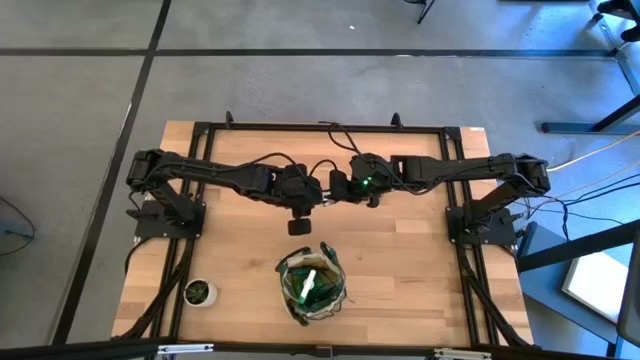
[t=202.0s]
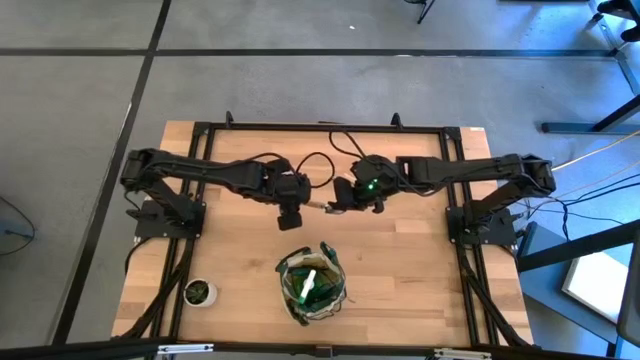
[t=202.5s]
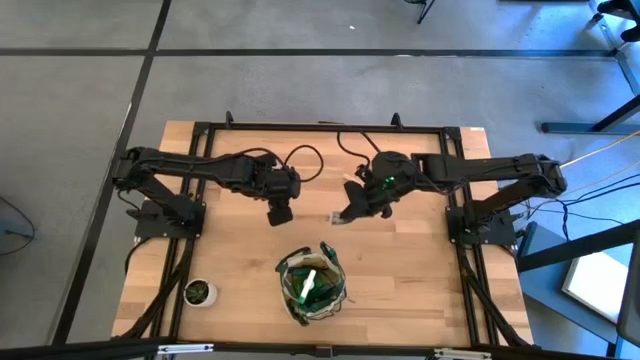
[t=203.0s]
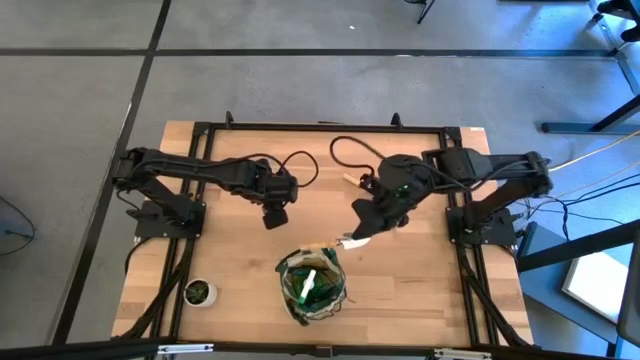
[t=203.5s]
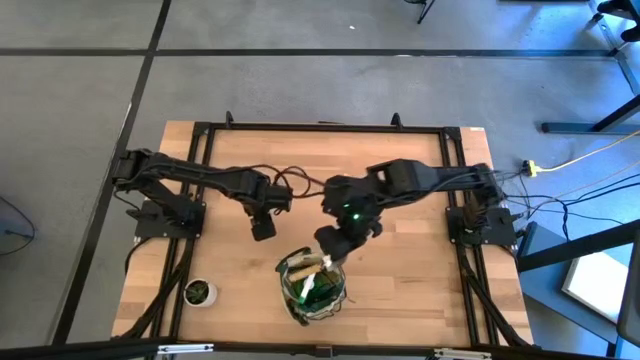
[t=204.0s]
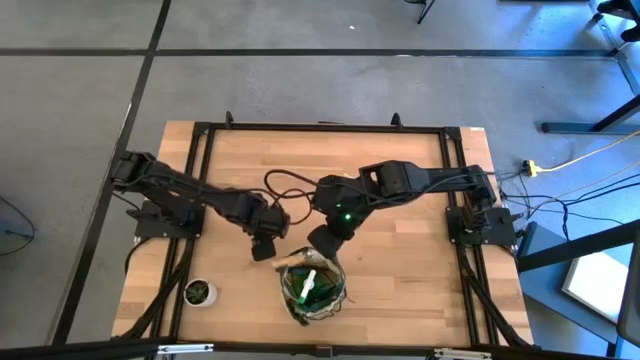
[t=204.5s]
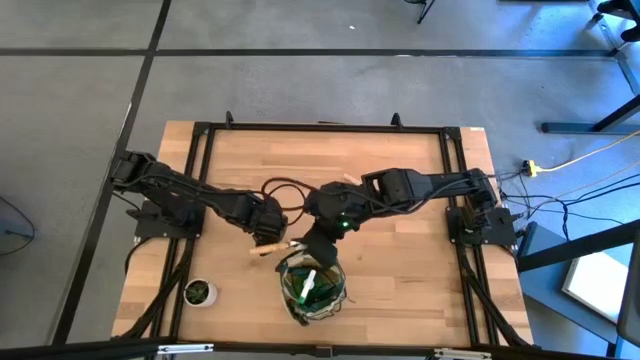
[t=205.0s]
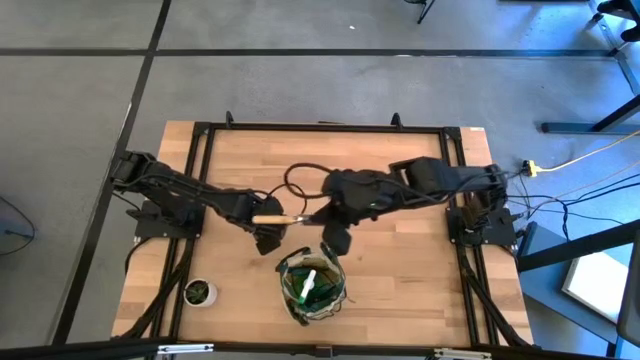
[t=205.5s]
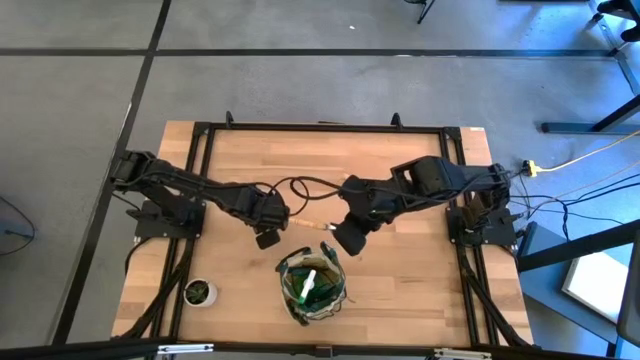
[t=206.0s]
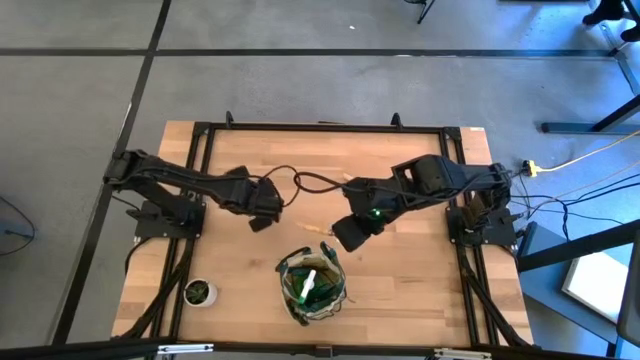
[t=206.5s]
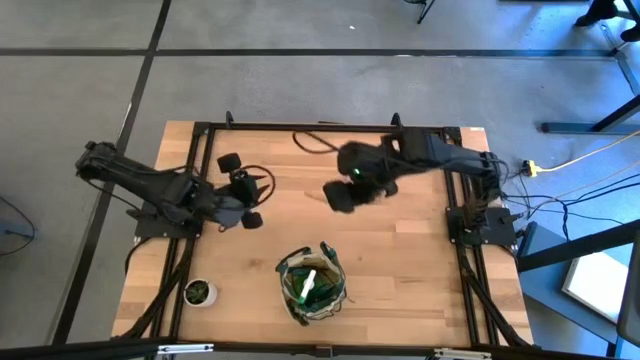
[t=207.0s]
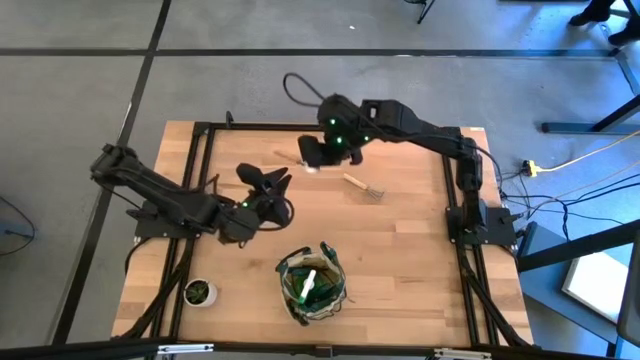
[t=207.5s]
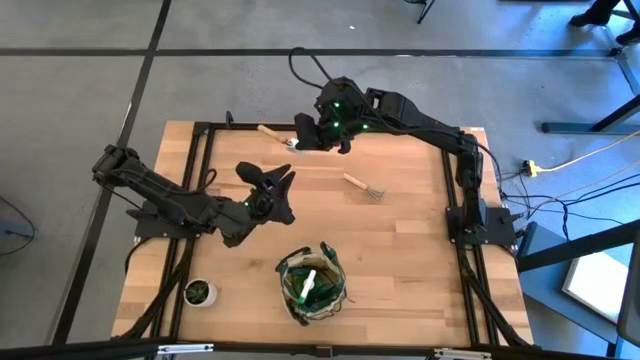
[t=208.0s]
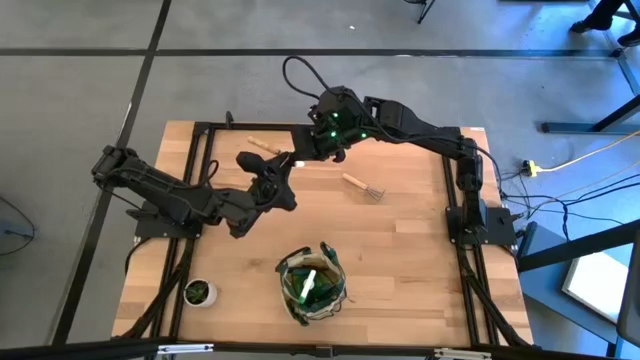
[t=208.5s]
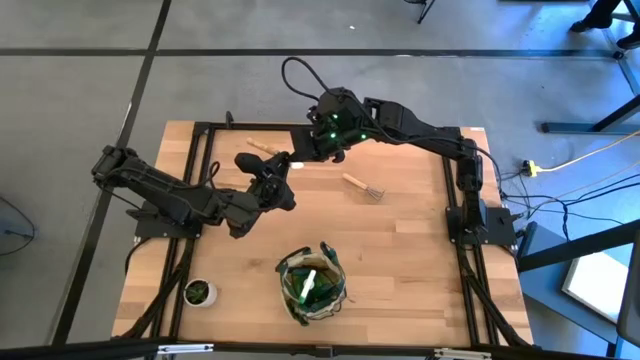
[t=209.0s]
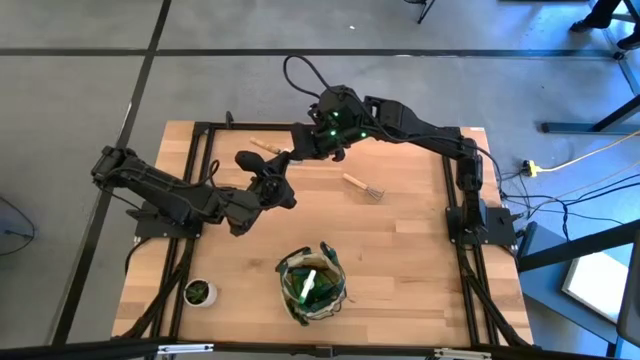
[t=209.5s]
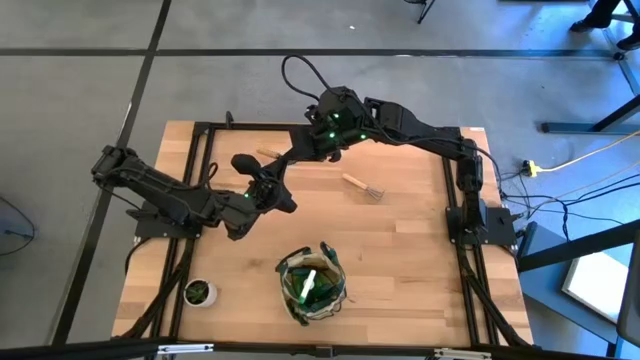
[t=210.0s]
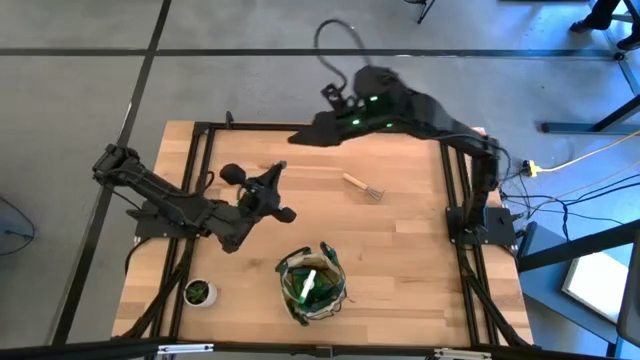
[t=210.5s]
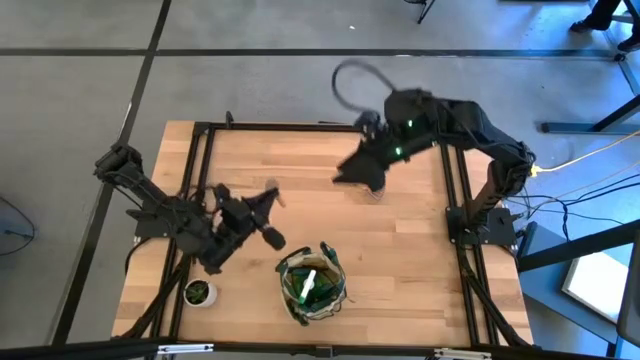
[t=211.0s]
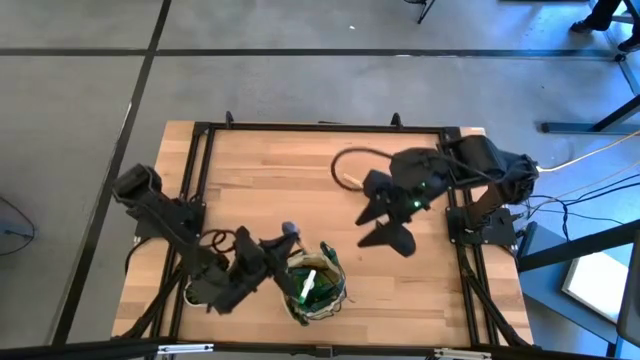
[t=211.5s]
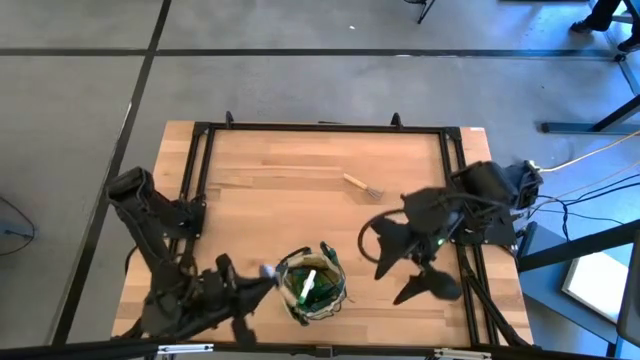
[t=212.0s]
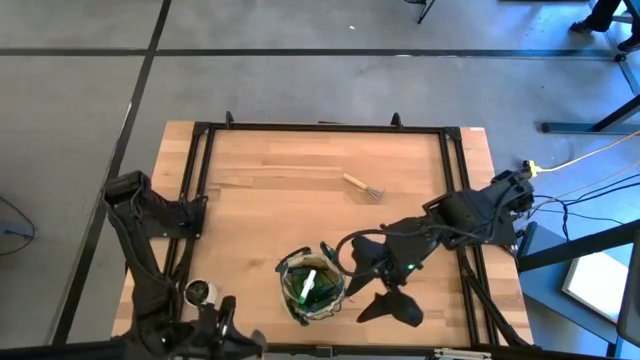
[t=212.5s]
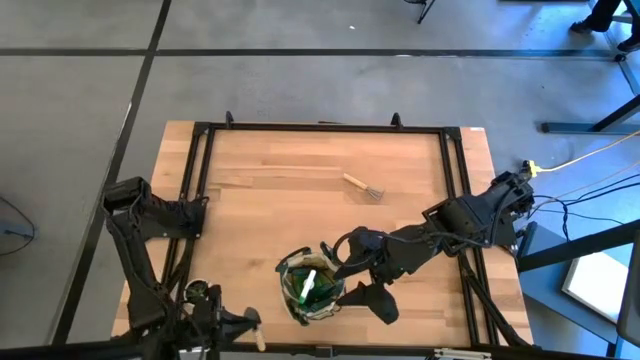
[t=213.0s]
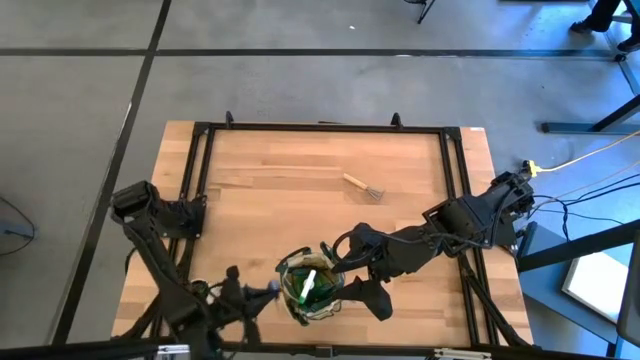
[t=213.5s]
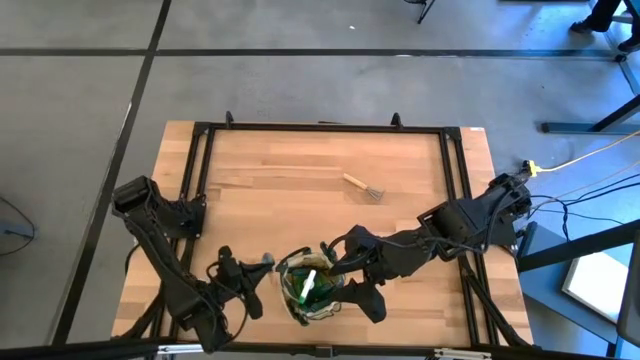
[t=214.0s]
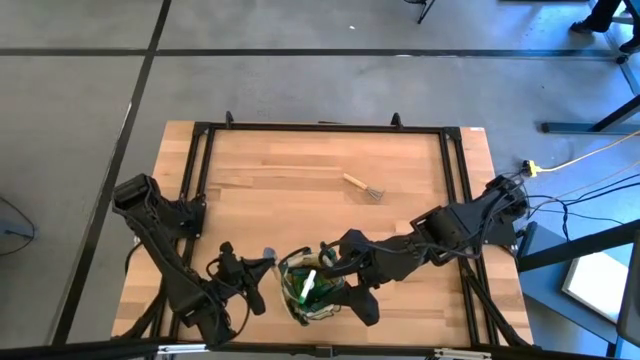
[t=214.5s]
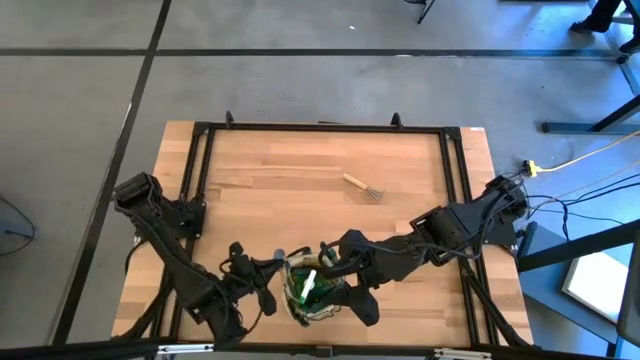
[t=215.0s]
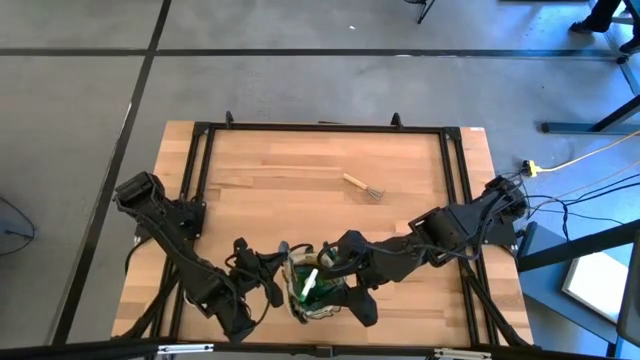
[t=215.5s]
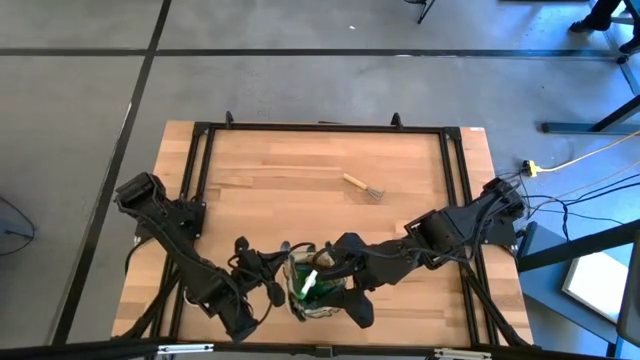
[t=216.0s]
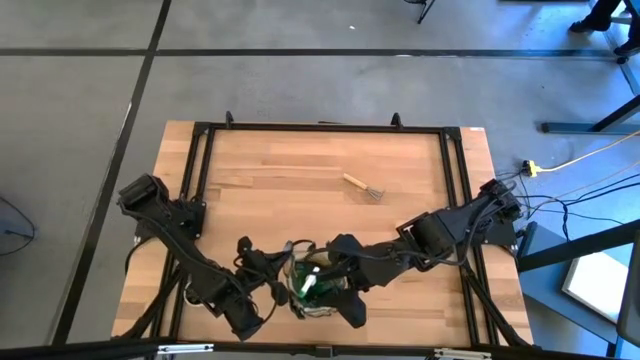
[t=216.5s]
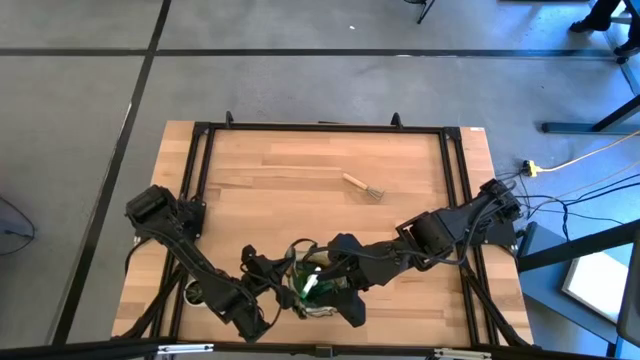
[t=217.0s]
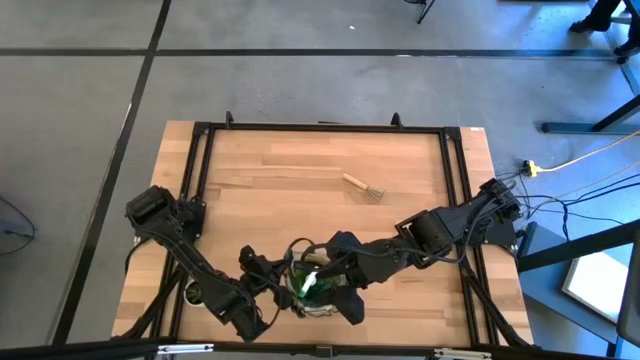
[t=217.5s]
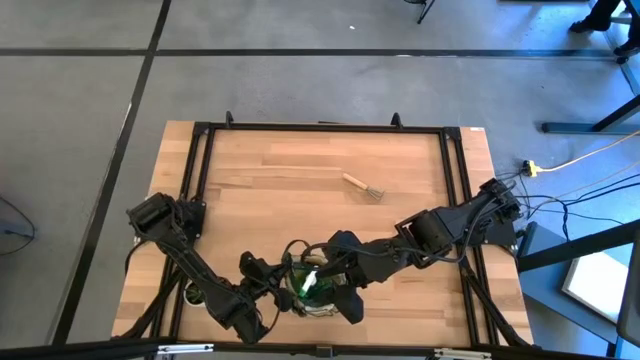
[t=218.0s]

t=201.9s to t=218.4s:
Task: Pick & Place Garden tools in Gardening bag
Put the brown trowel into the gardening bag
